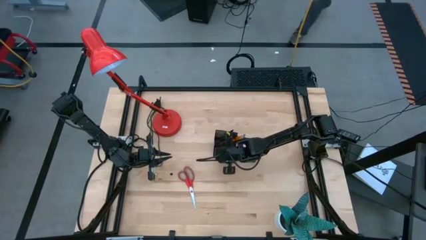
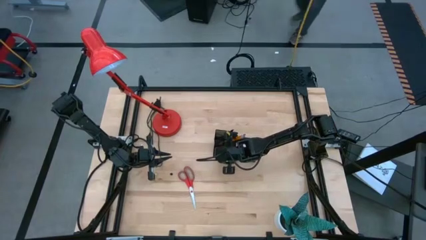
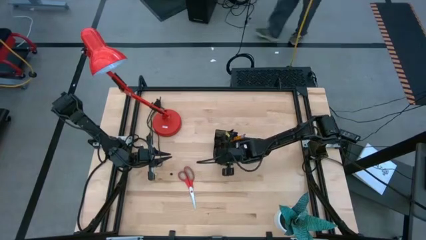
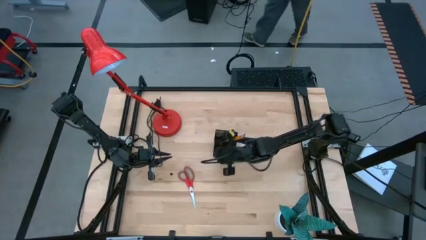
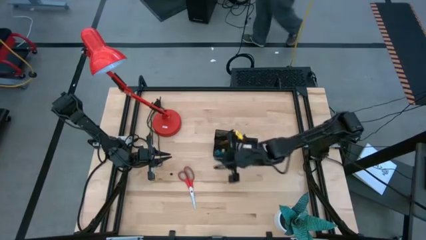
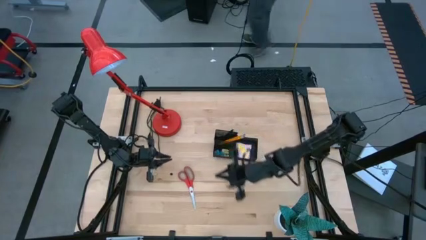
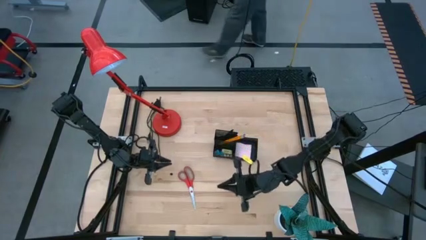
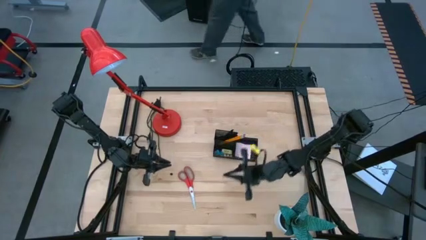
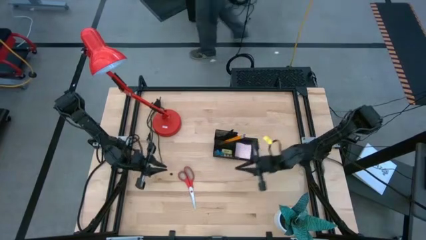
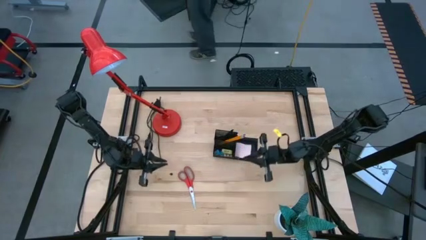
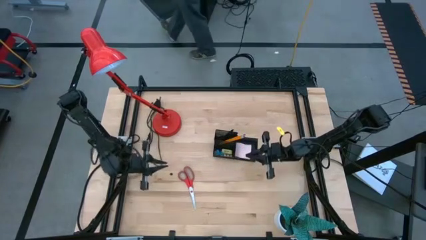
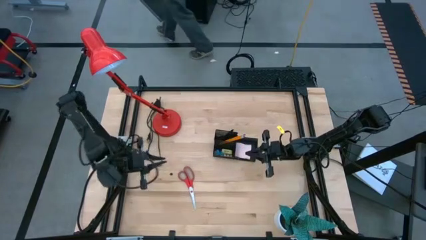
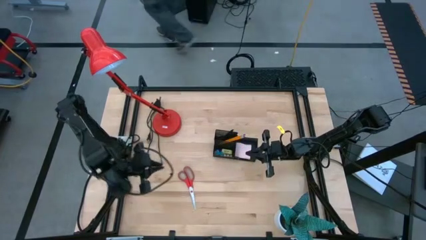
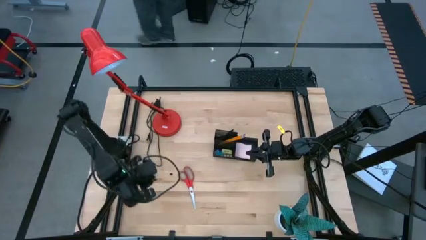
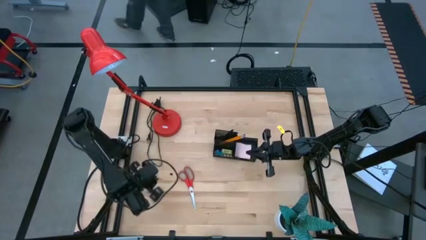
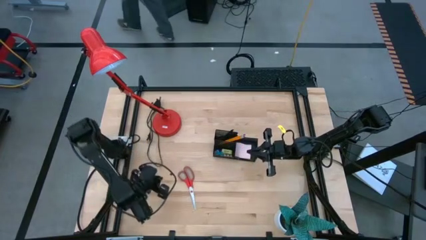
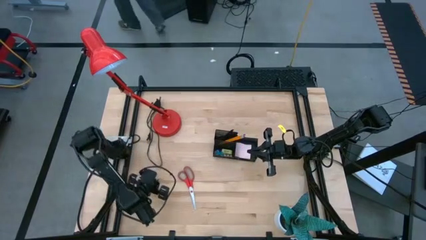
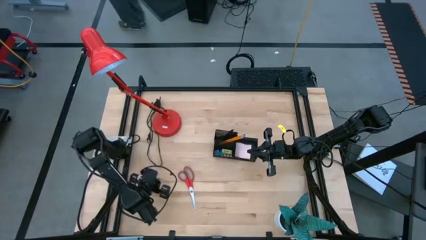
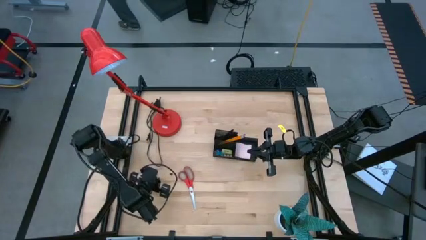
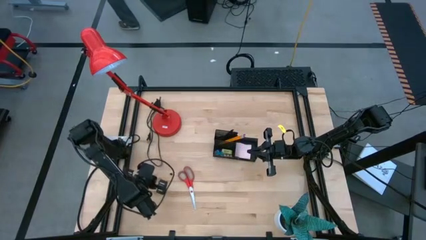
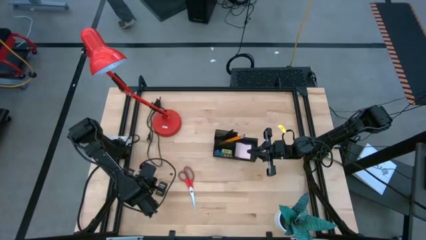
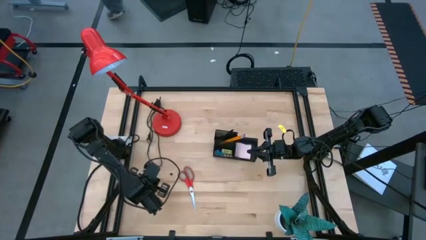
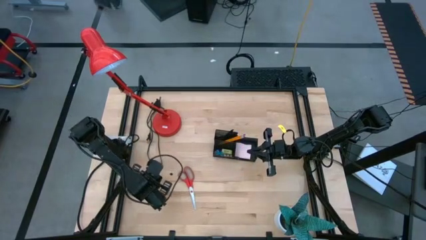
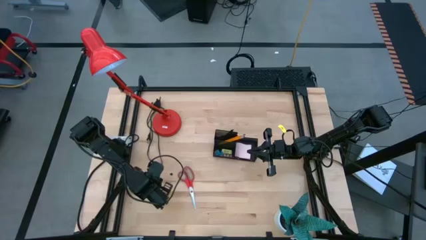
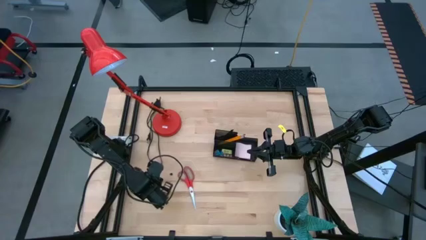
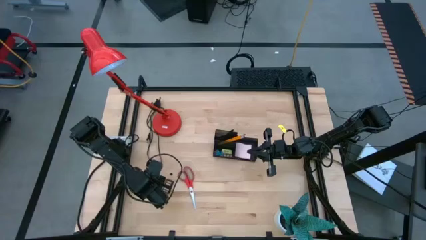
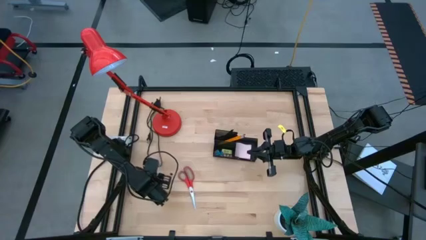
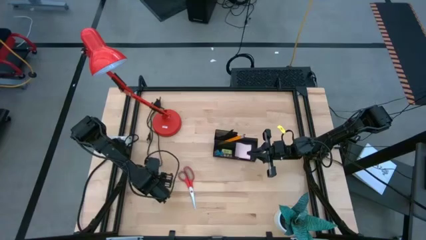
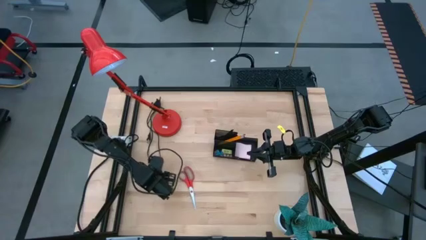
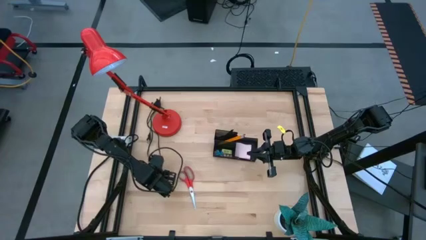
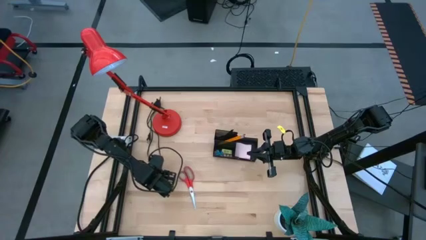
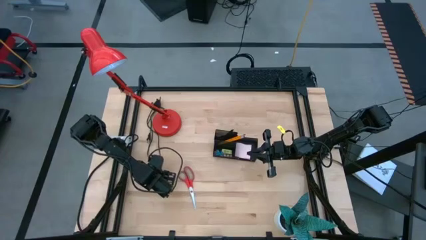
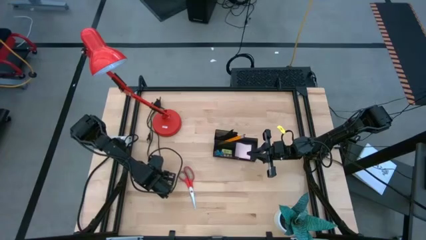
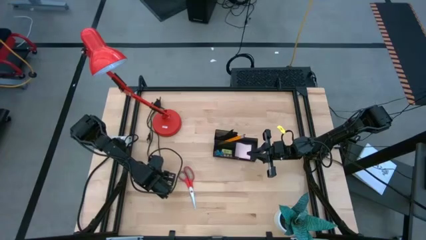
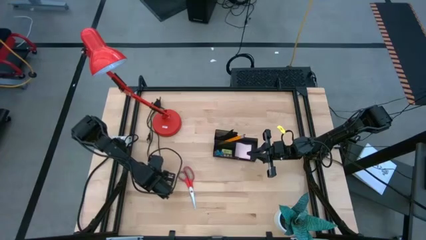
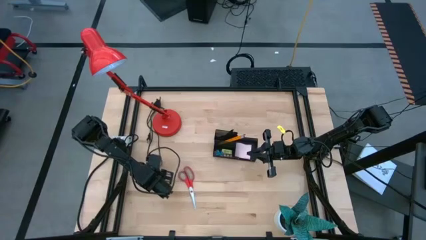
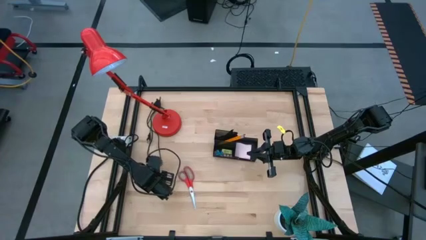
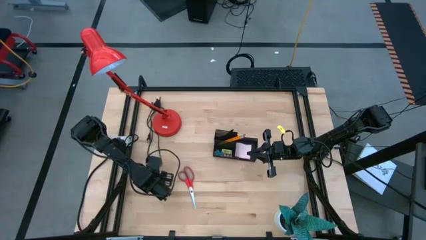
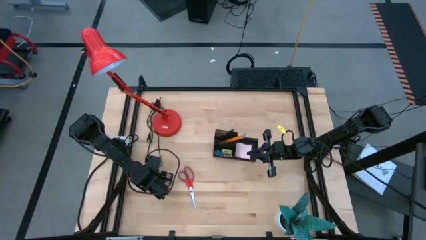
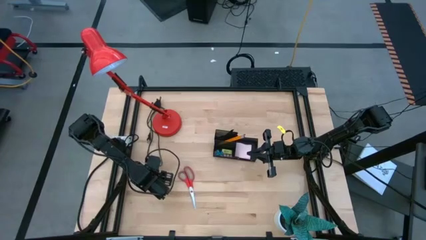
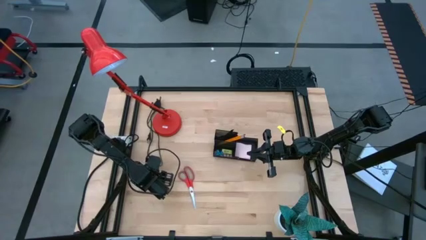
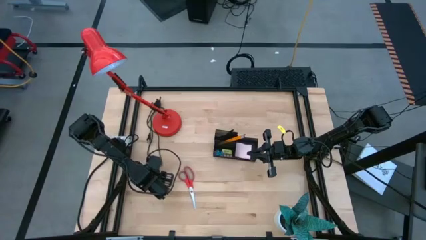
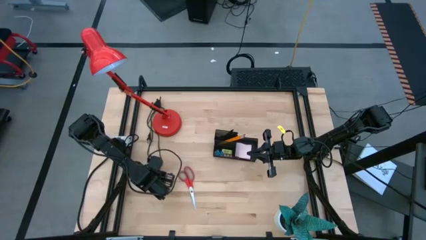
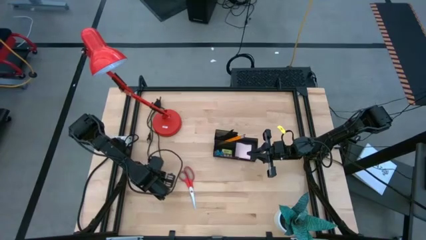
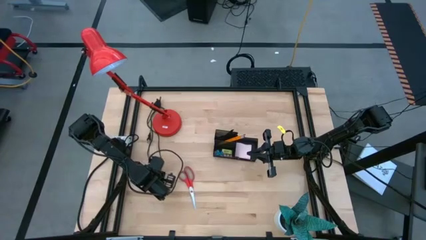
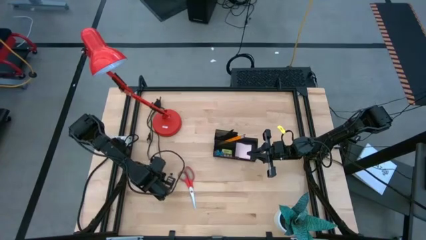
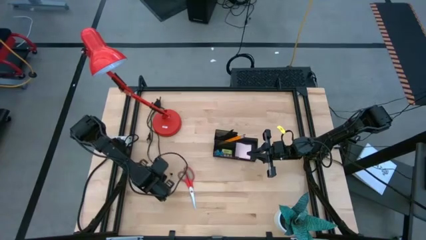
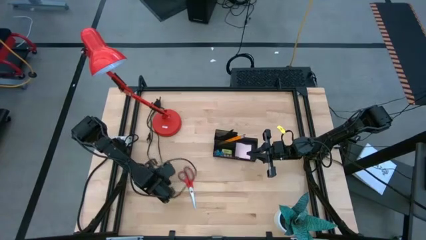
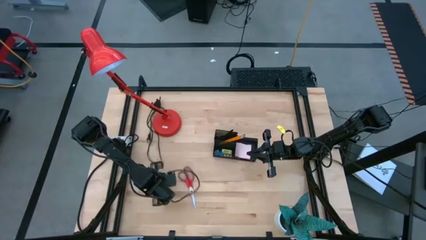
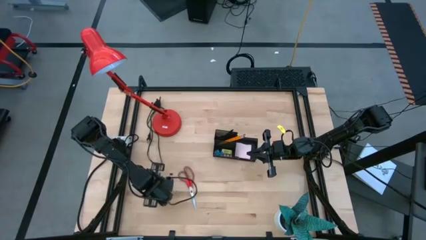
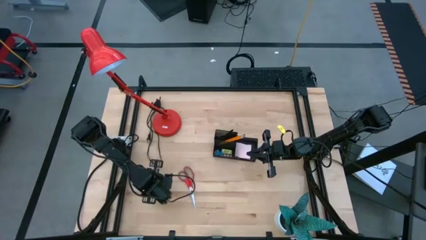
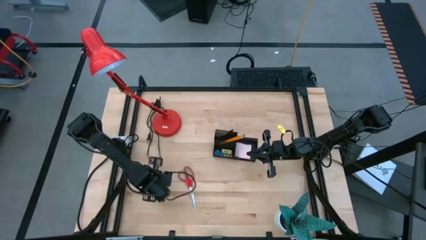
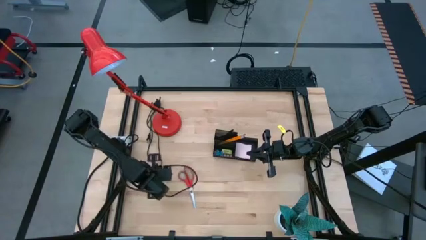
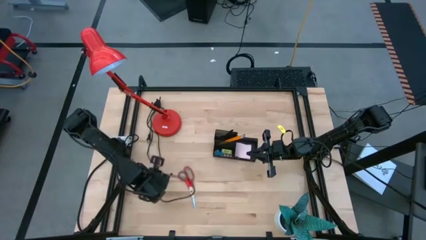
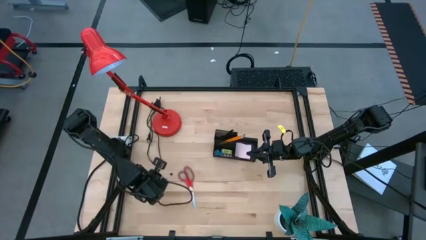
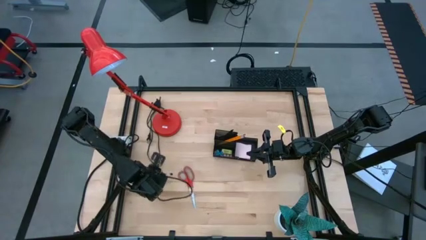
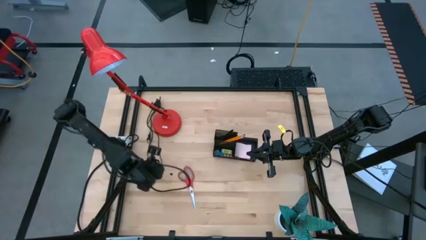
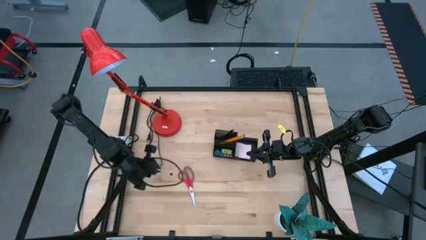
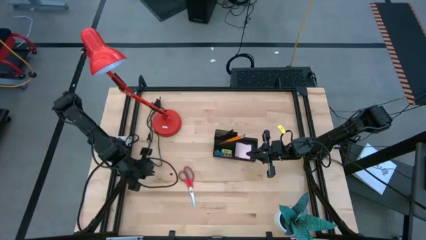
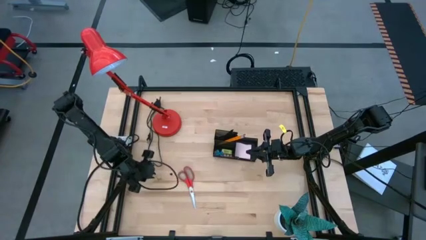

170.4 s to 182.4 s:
Task: Pick and place office supplies into organizer
Put the green binder clip into the black desk organizer

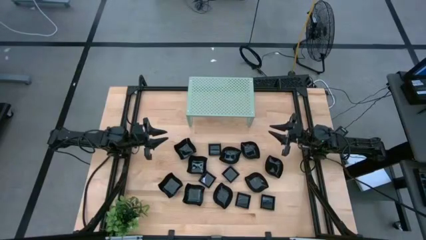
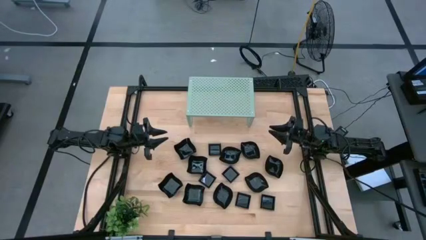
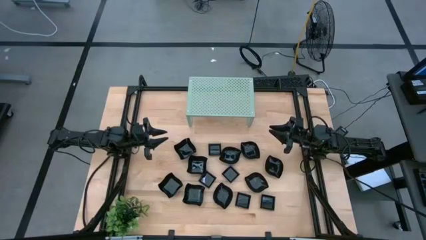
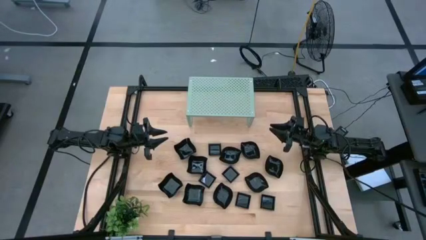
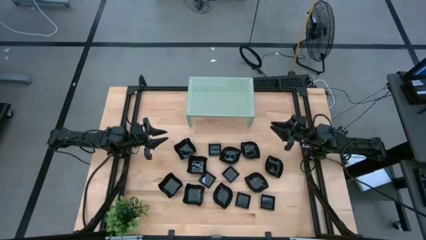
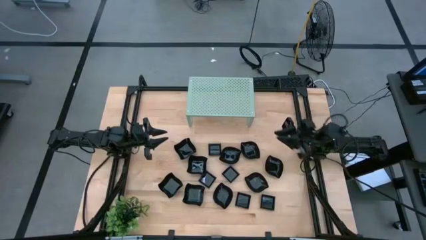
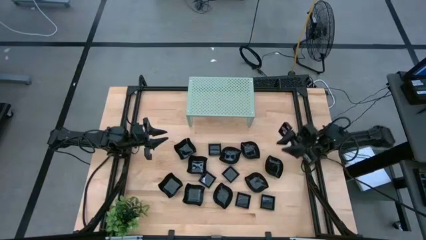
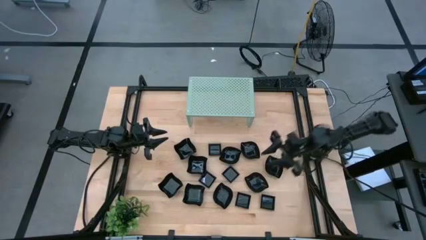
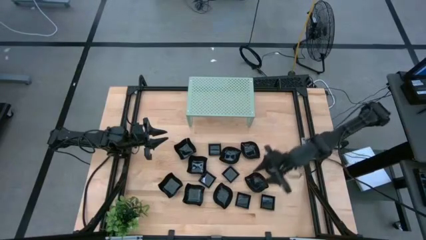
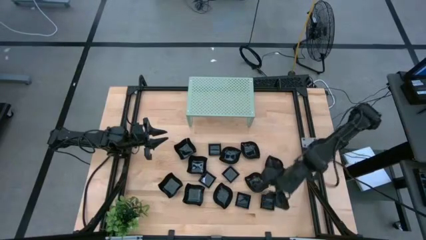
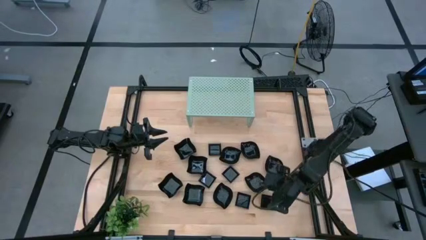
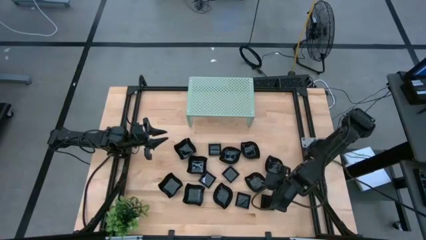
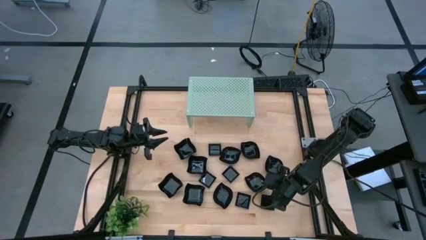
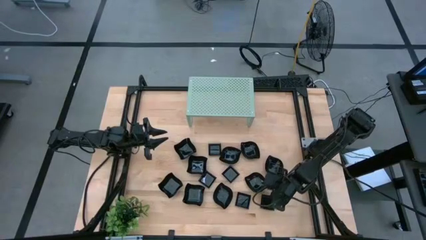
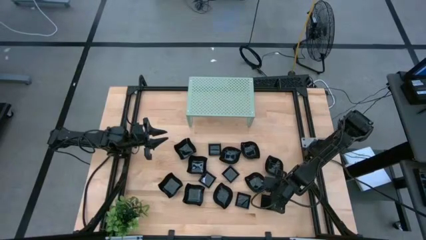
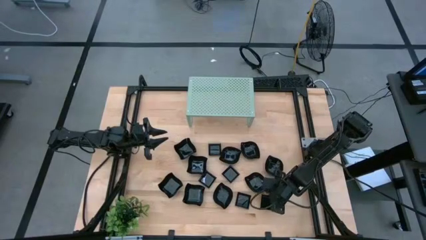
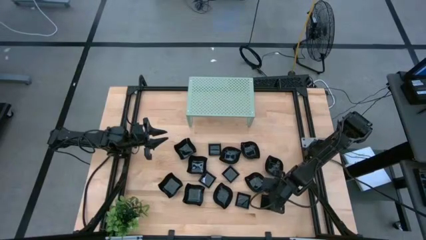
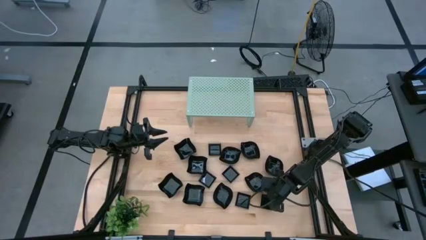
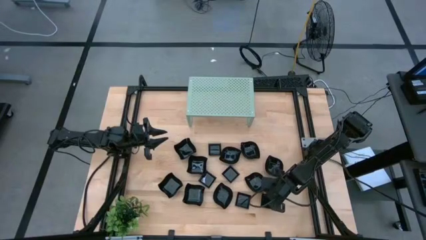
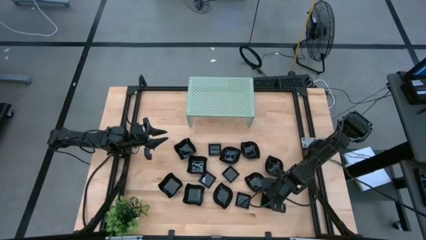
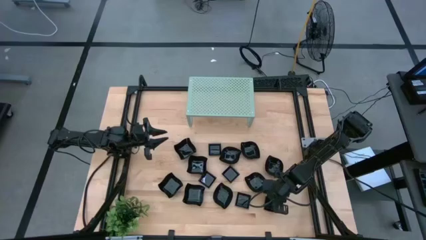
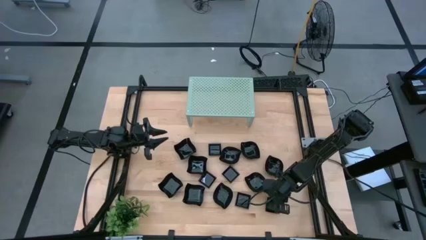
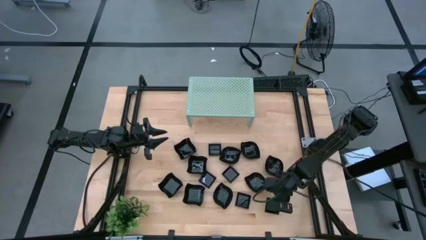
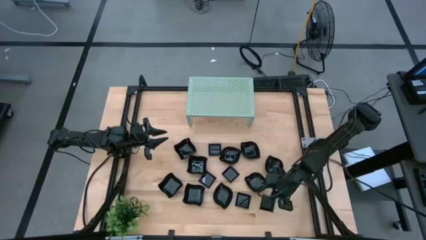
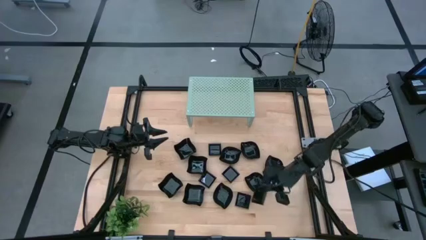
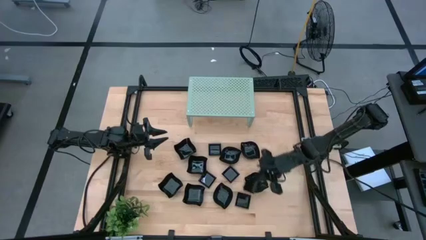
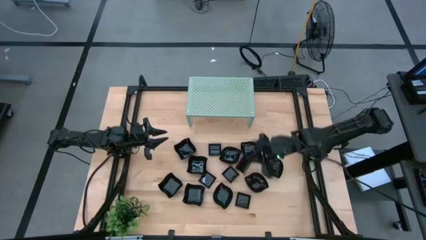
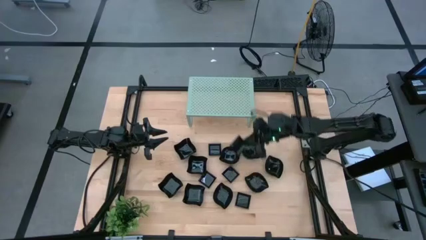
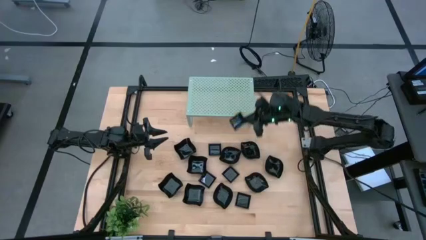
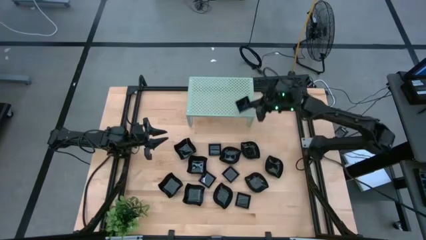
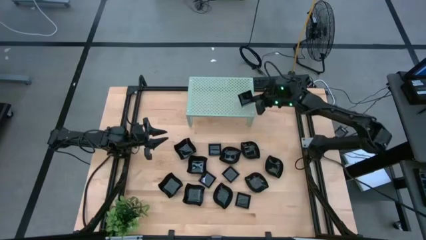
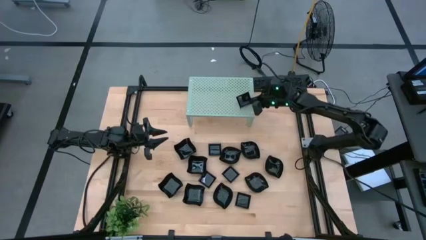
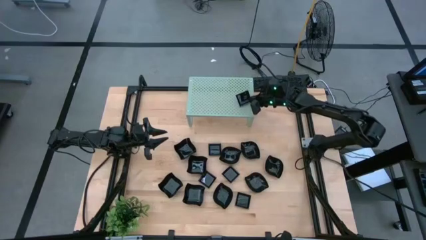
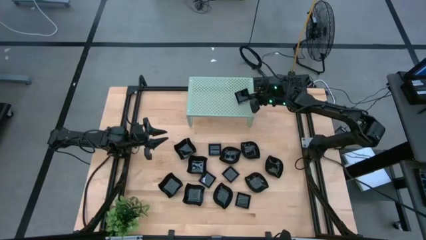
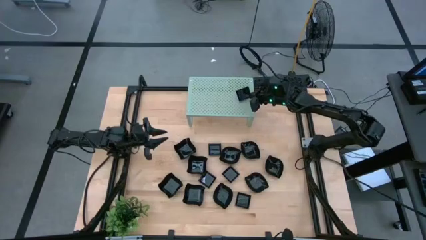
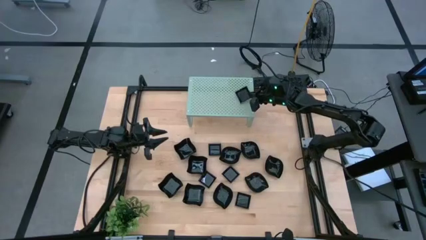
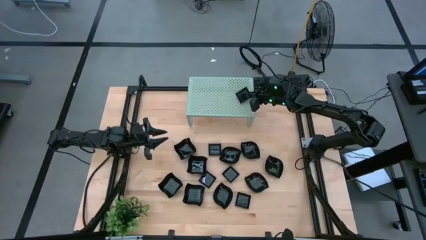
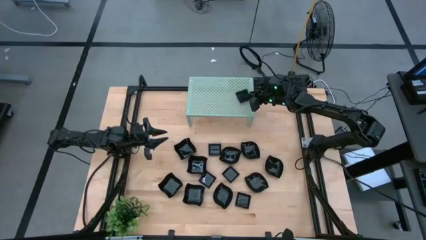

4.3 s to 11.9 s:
Task: Pick & Place Mini shaped plates
Put the black square plate on the shelf
